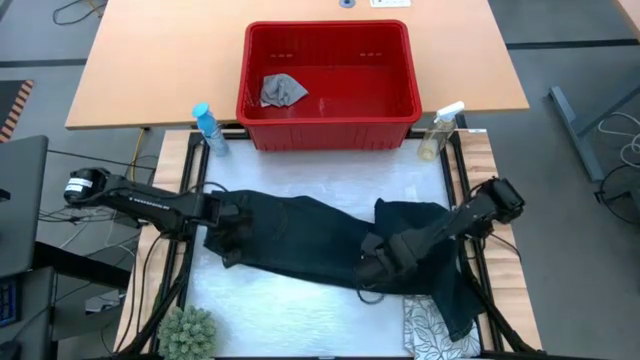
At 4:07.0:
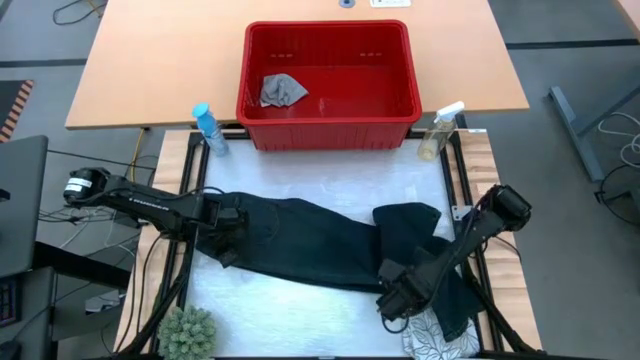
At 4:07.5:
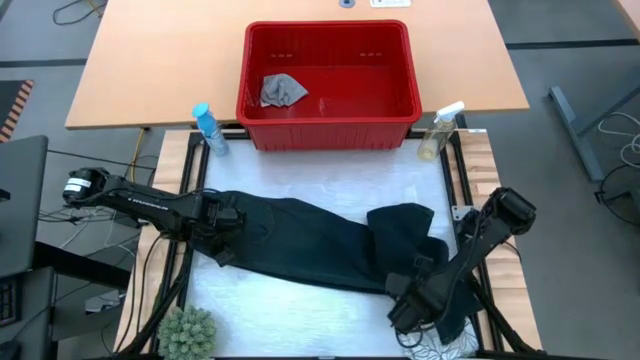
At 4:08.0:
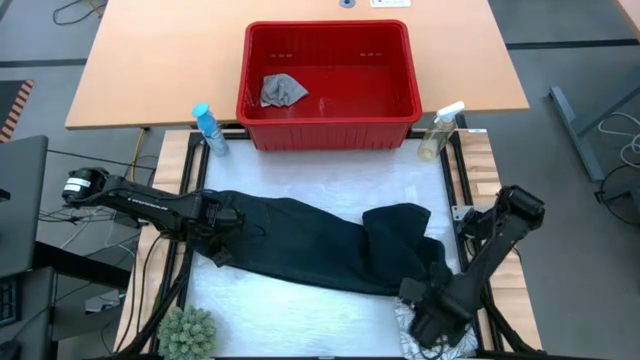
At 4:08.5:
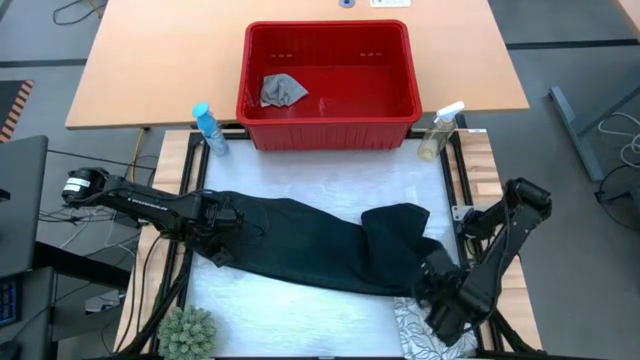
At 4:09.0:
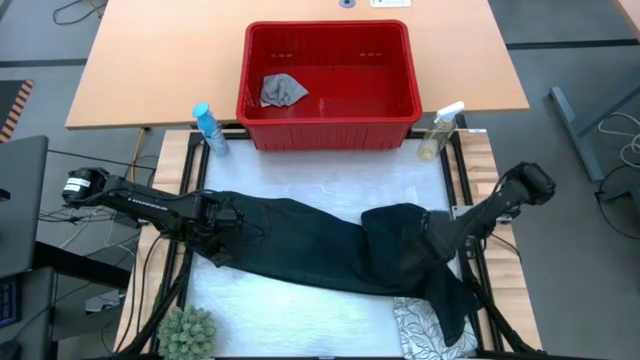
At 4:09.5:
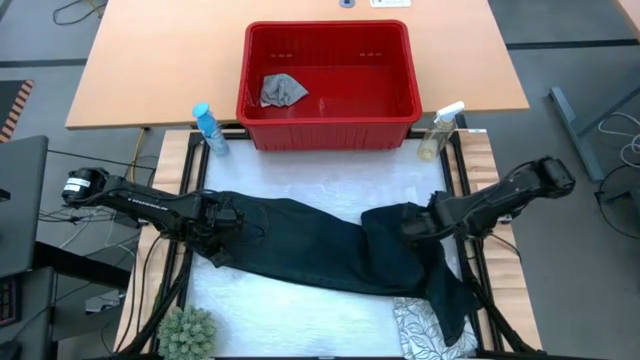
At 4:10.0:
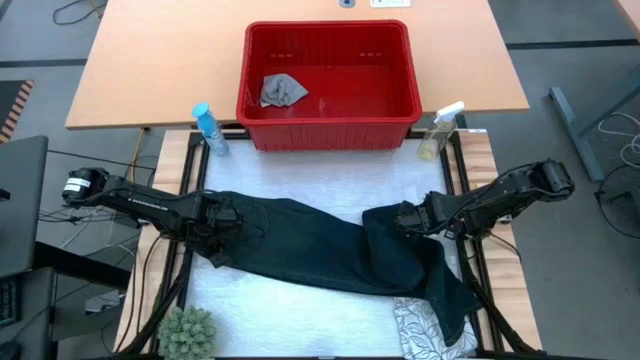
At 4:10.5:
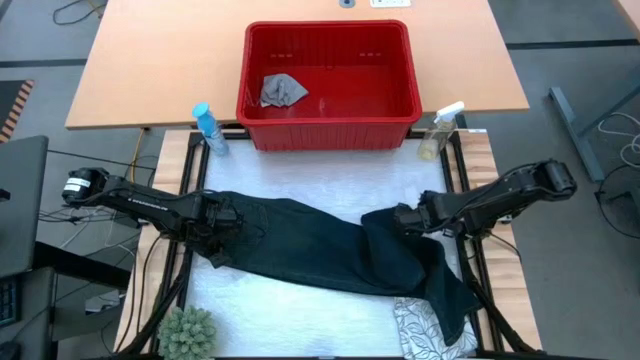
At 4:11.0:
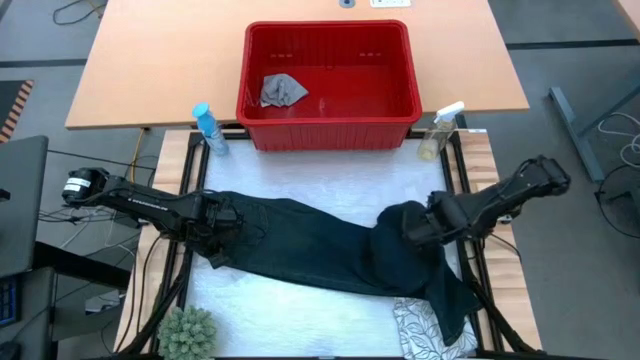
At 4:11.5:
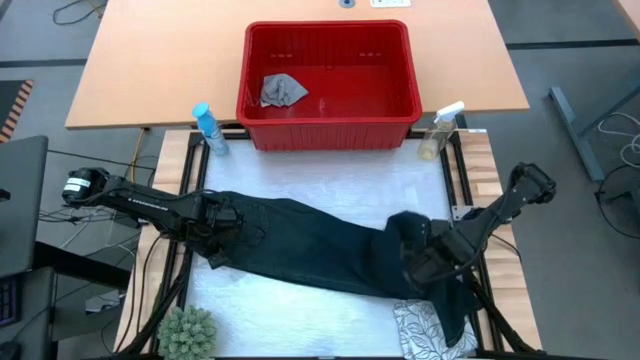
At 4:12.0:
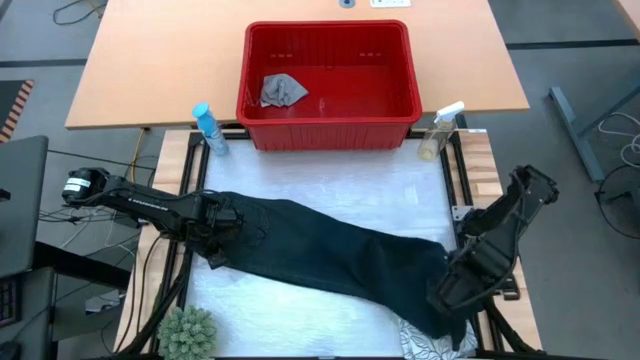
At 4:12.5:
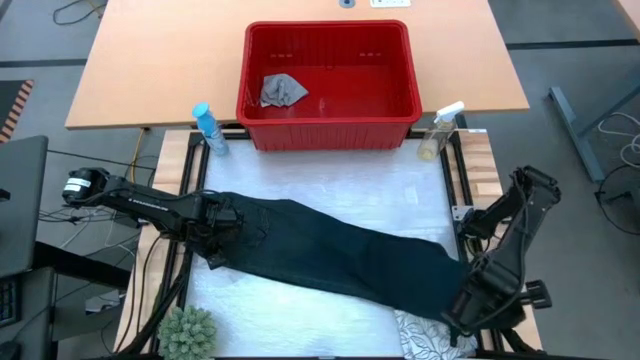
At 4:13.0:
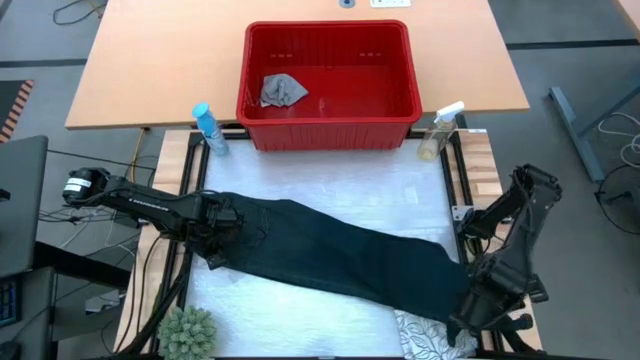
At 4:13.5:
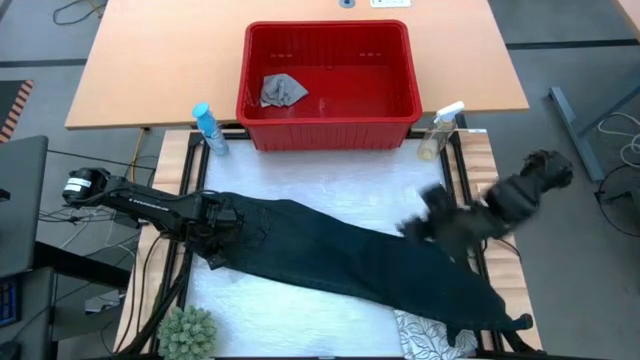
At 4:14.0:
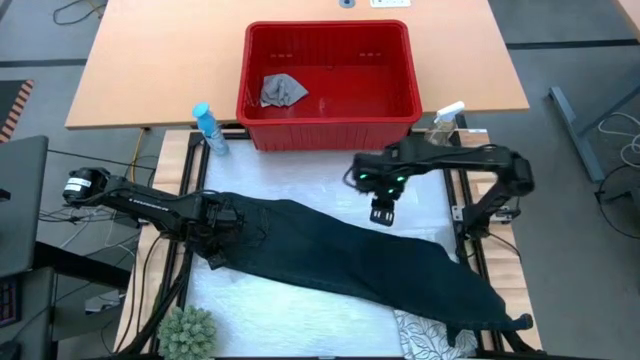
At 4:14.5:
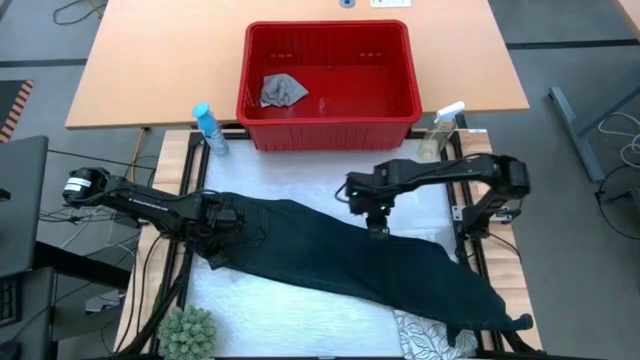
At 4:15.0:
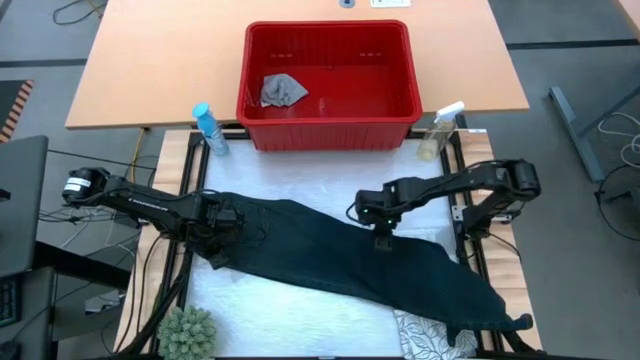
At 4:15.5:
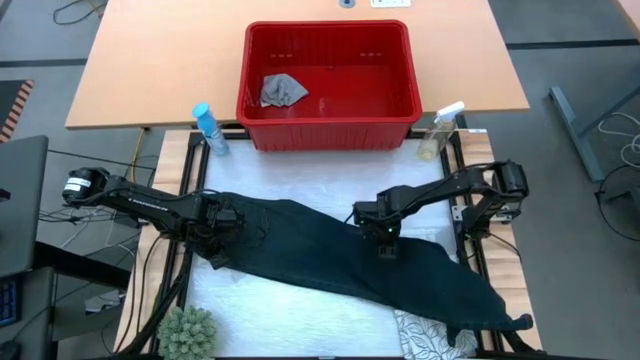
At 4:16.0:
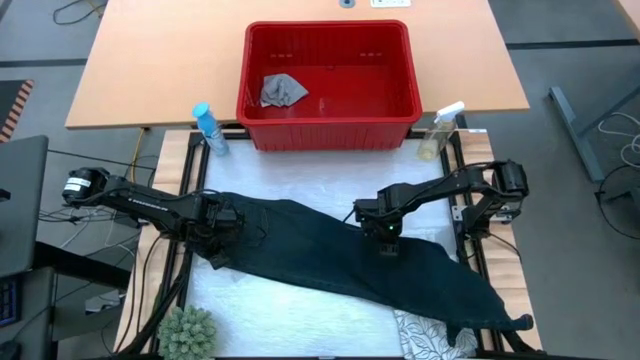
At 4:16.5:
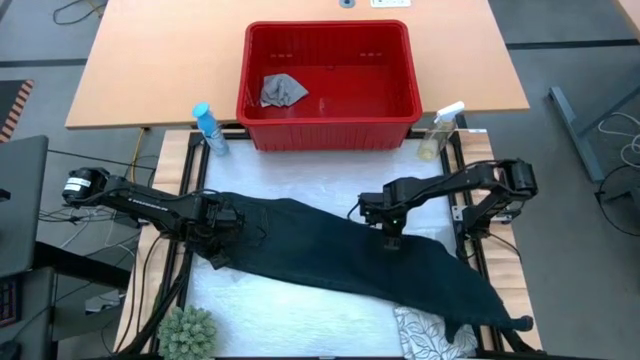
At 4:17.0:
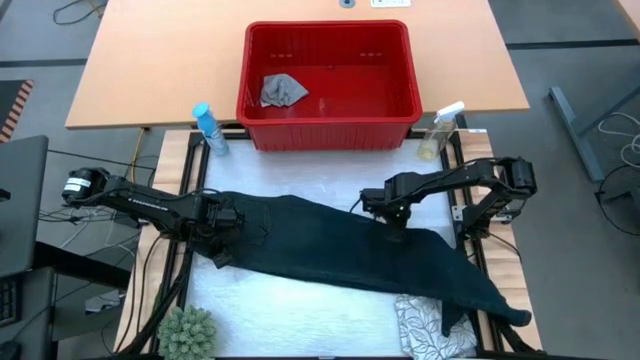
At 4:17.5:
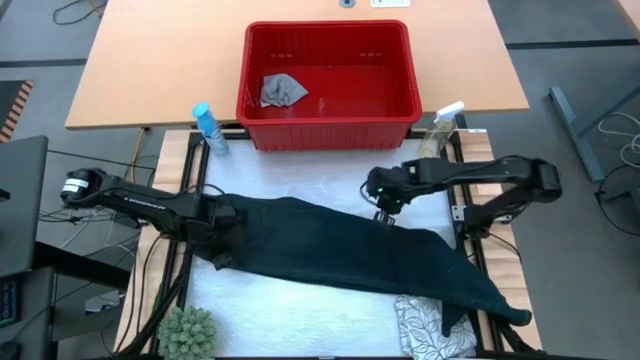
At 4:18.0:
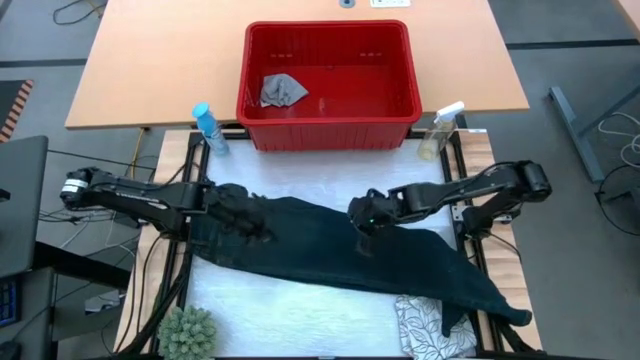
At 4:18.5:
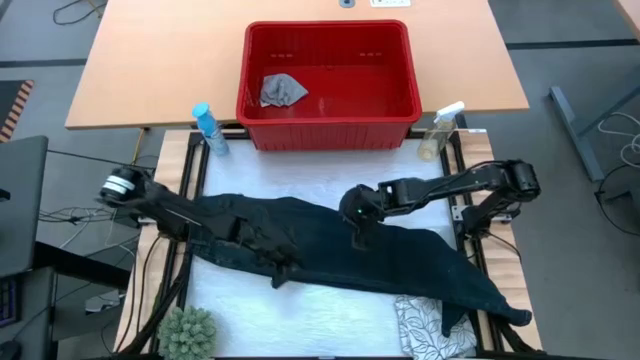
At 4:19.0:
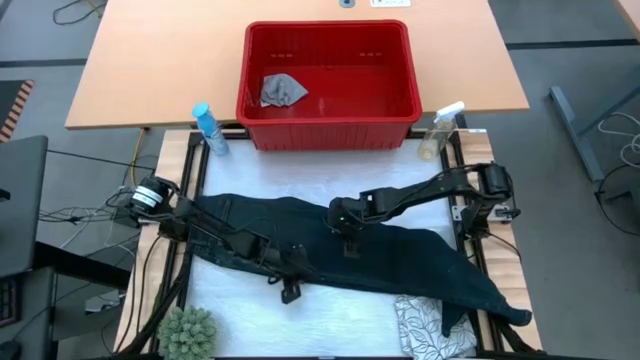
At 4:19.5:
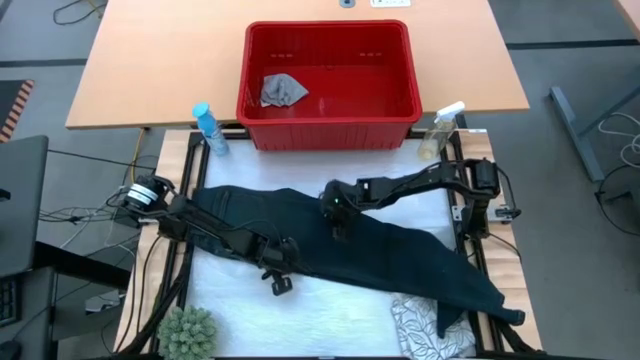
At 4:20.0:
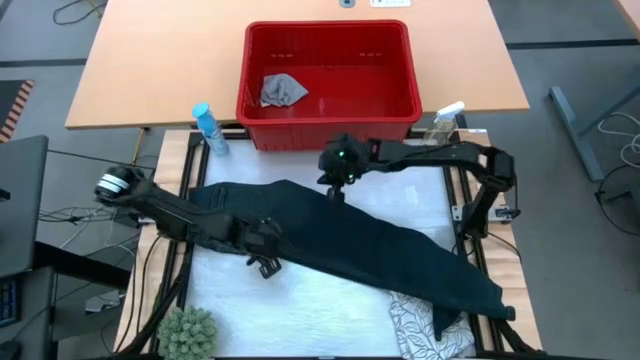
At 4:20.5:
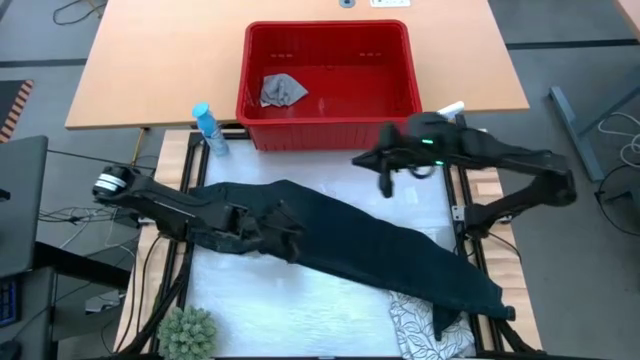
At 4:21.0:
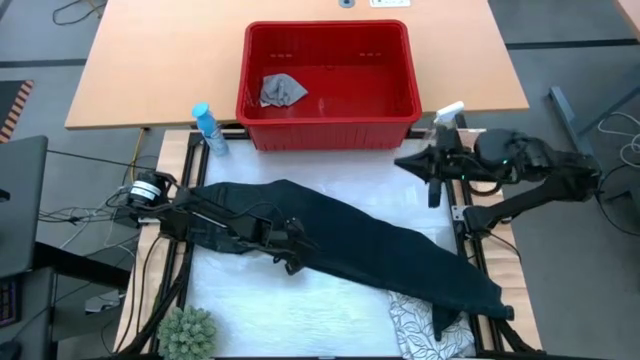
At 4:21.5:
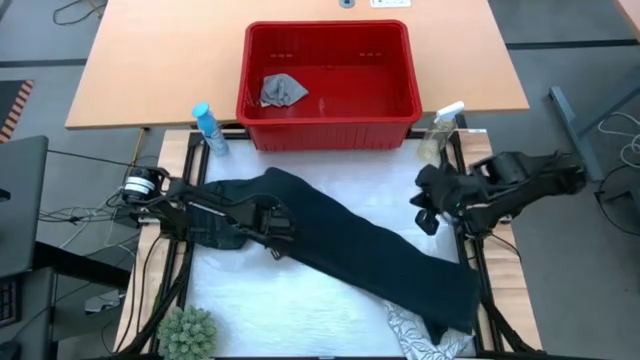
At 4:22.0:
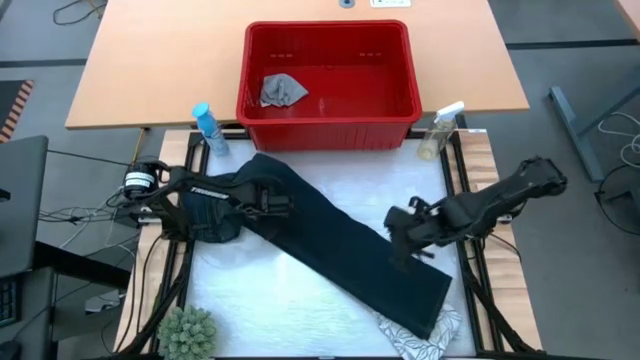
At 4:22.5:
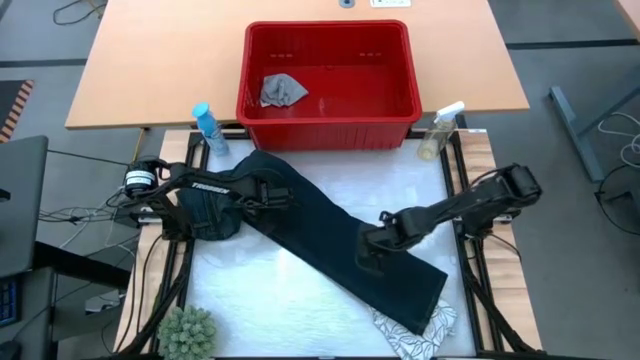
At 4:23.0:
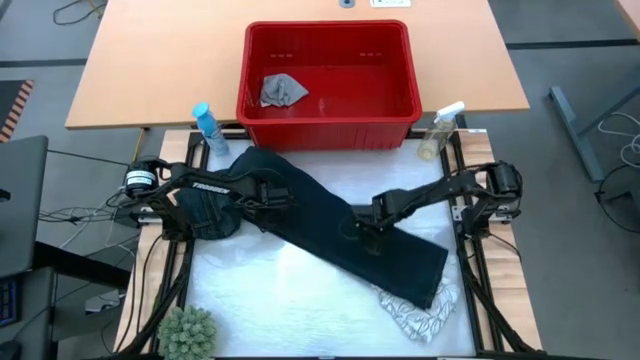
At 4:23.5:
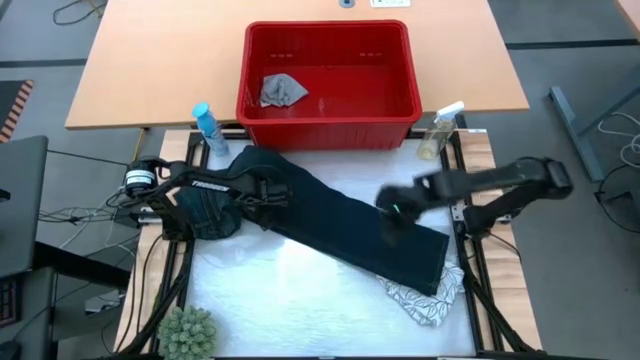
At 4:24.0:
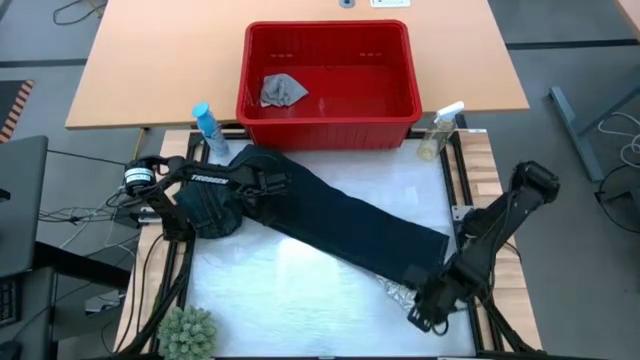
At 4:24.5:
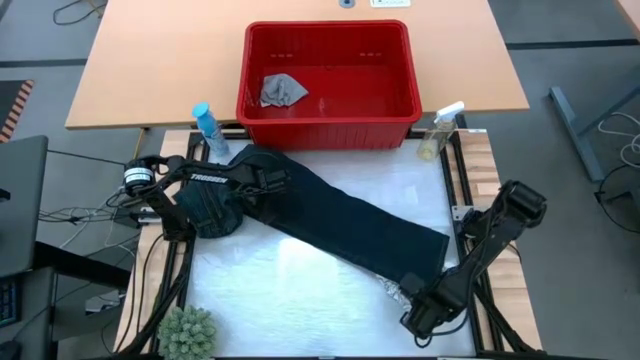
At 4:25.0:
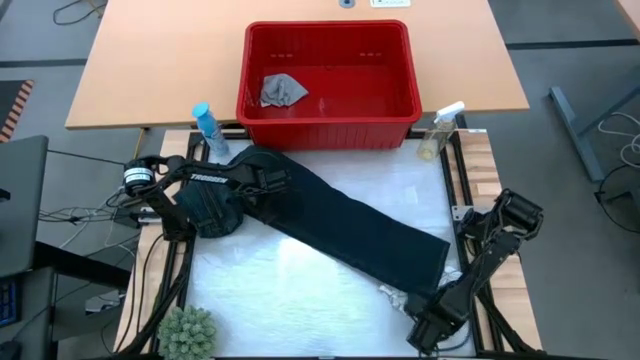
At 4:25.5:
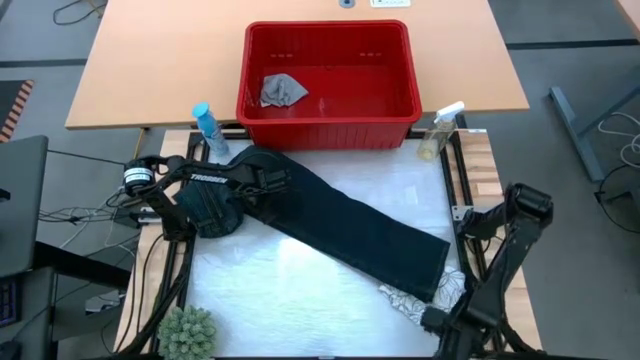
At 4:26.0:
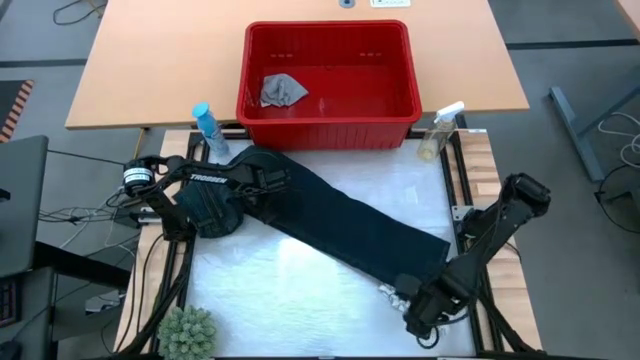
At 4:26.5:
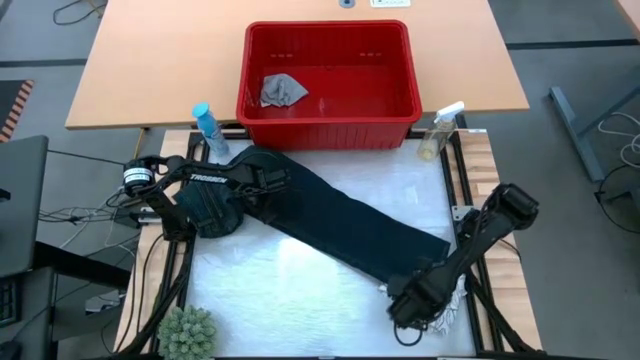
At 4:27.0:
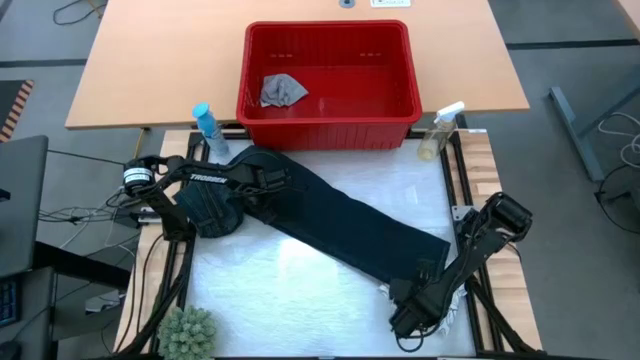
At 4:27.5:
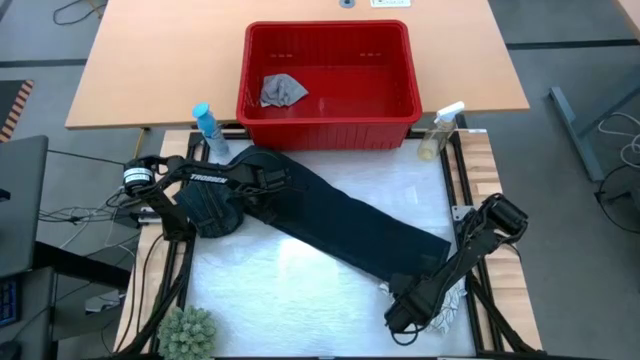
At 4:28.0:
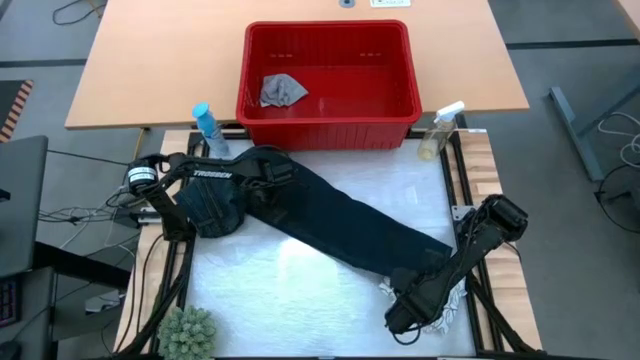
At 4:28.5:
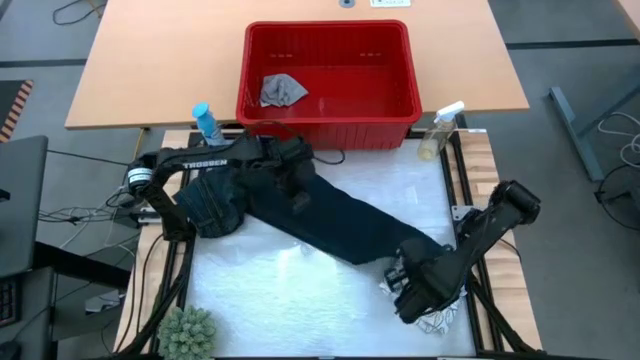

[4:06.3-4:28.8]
Task: Fold laundry
Fold the dark blue pants
